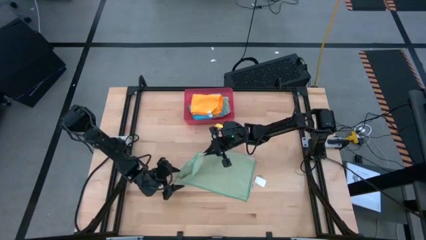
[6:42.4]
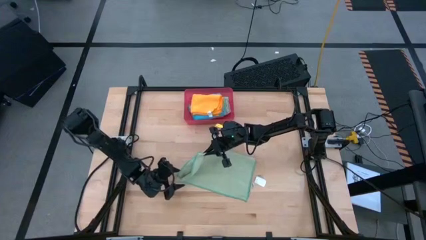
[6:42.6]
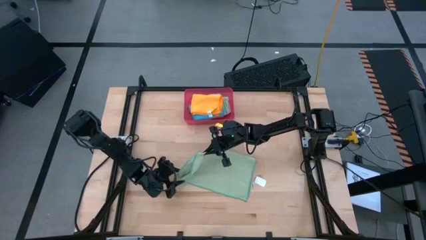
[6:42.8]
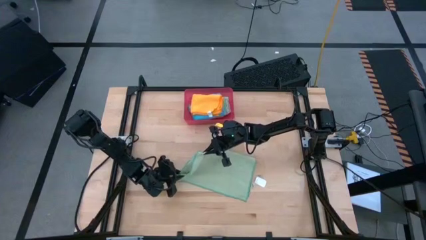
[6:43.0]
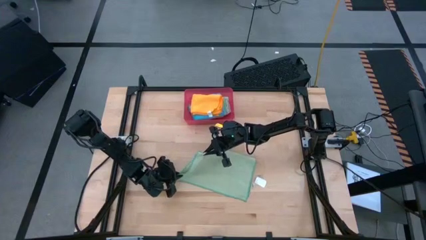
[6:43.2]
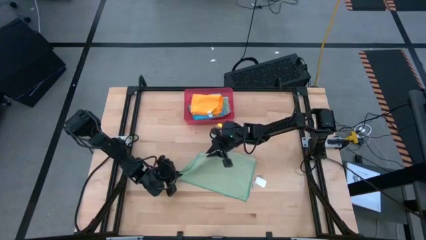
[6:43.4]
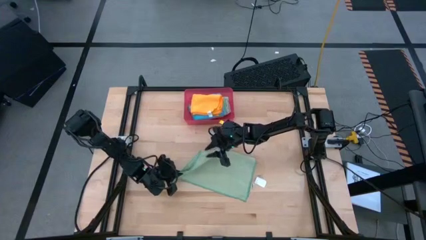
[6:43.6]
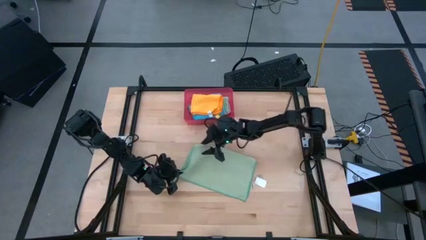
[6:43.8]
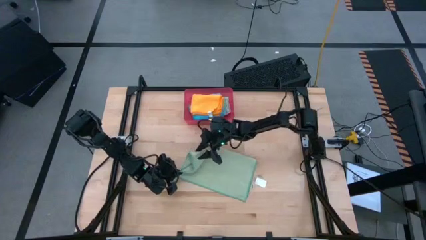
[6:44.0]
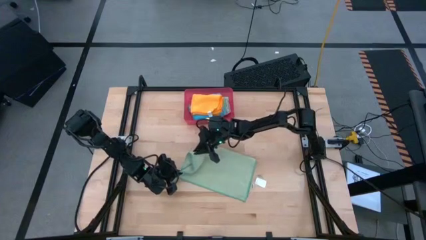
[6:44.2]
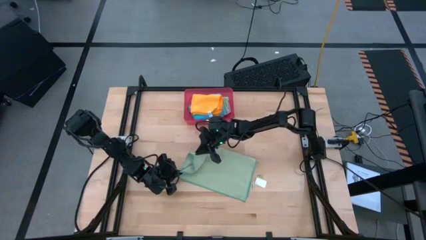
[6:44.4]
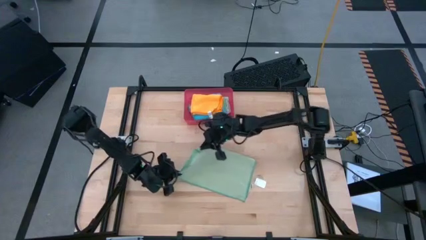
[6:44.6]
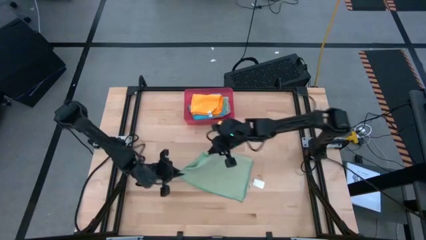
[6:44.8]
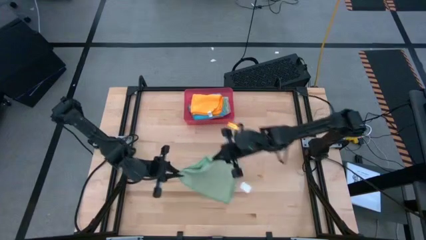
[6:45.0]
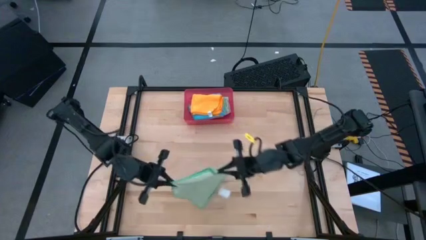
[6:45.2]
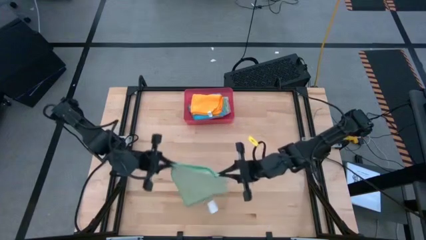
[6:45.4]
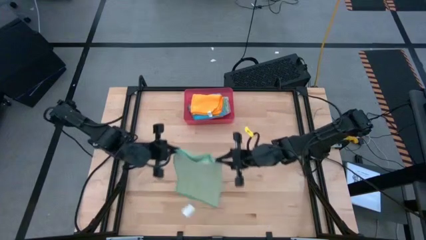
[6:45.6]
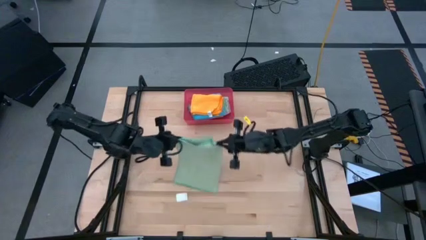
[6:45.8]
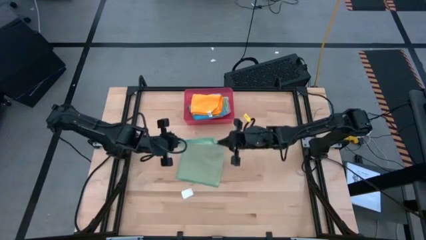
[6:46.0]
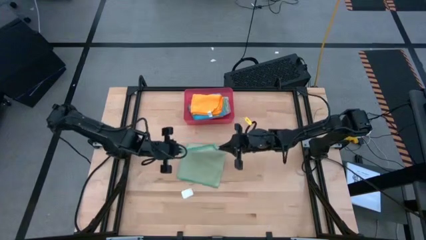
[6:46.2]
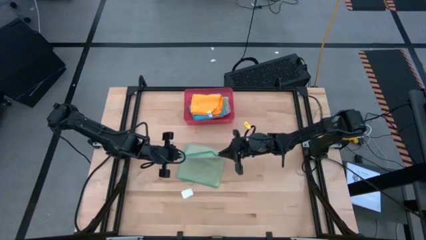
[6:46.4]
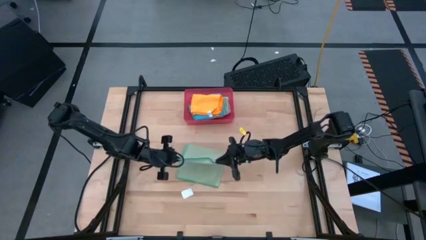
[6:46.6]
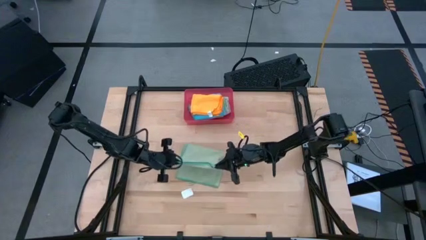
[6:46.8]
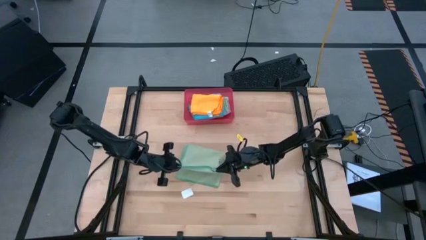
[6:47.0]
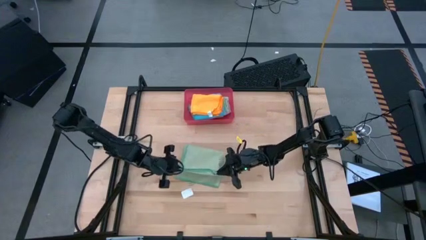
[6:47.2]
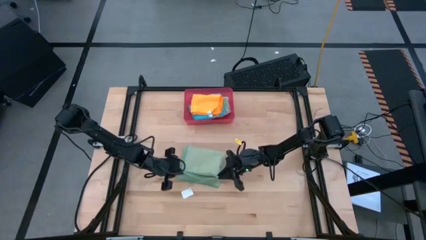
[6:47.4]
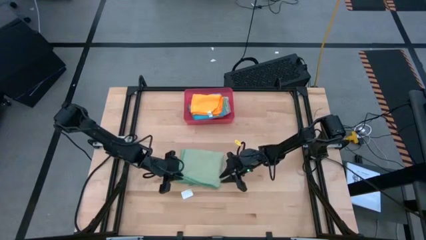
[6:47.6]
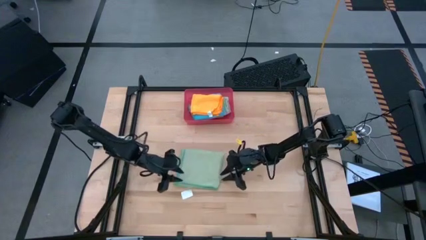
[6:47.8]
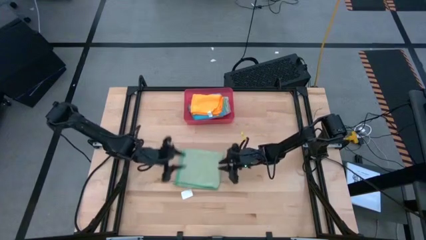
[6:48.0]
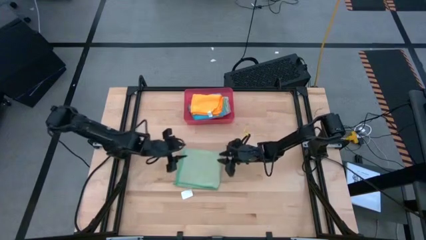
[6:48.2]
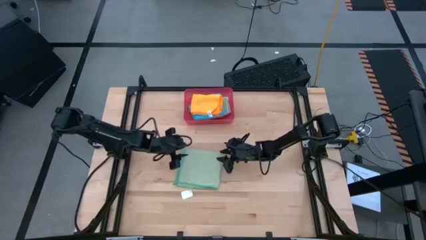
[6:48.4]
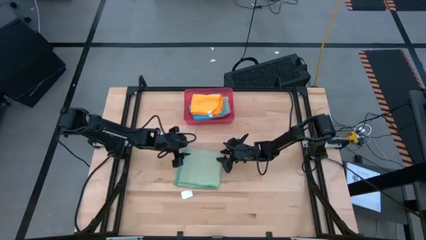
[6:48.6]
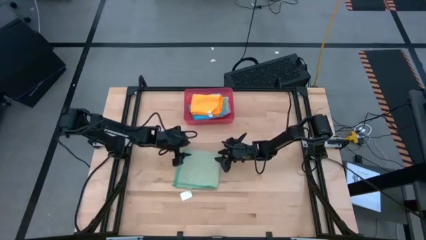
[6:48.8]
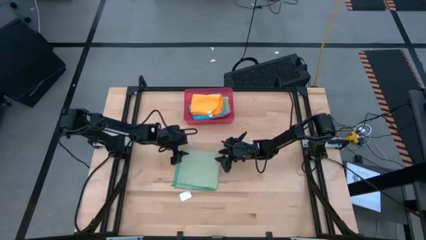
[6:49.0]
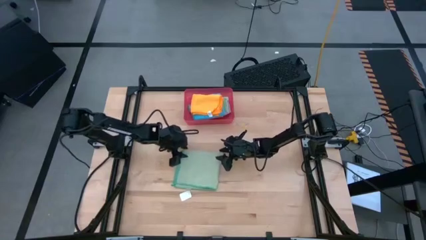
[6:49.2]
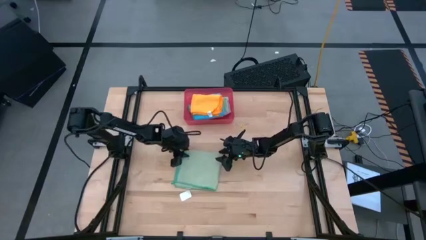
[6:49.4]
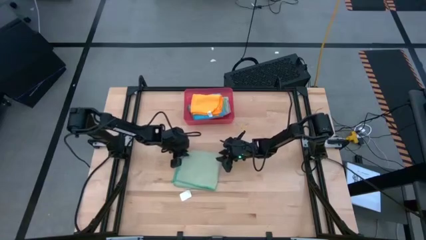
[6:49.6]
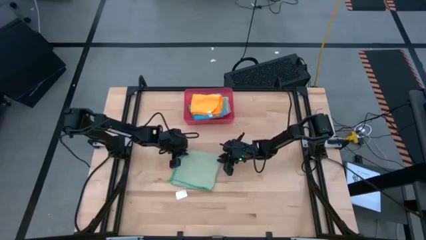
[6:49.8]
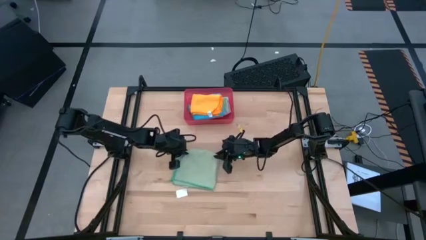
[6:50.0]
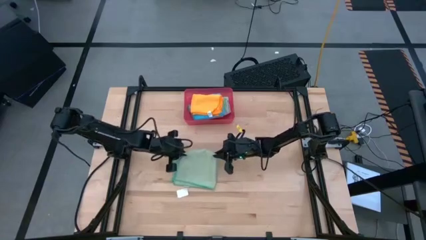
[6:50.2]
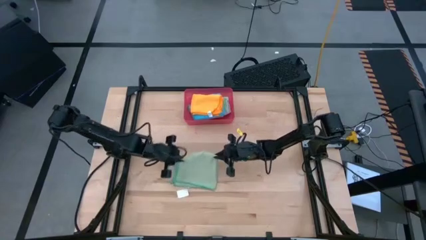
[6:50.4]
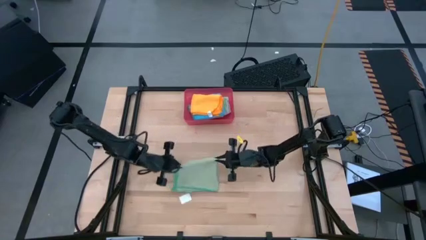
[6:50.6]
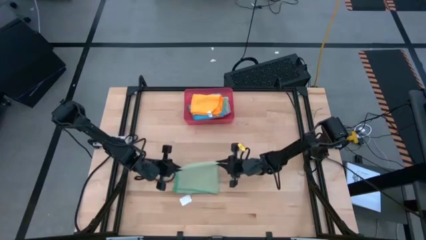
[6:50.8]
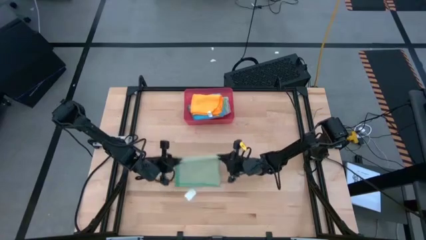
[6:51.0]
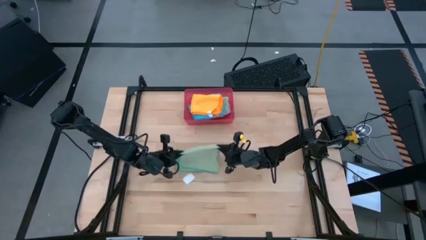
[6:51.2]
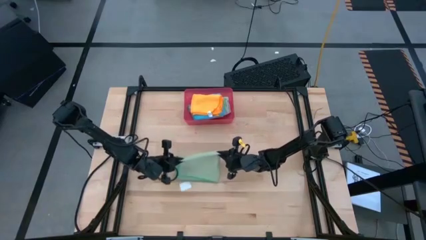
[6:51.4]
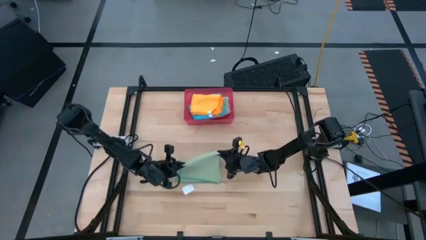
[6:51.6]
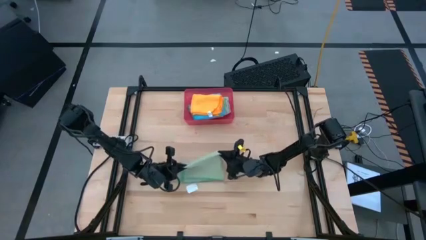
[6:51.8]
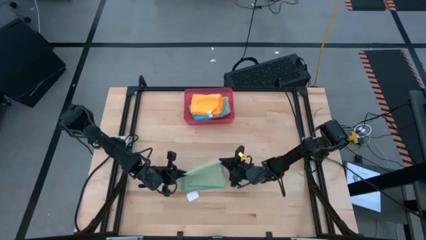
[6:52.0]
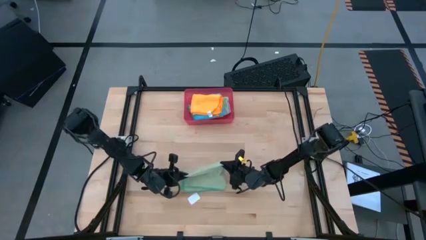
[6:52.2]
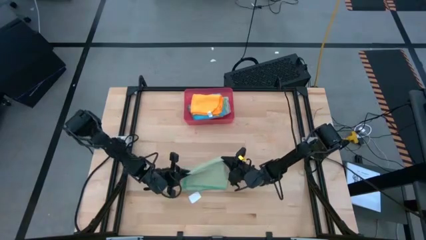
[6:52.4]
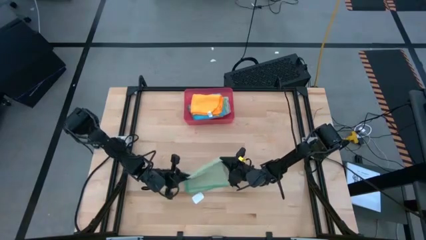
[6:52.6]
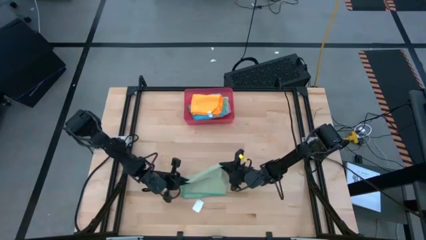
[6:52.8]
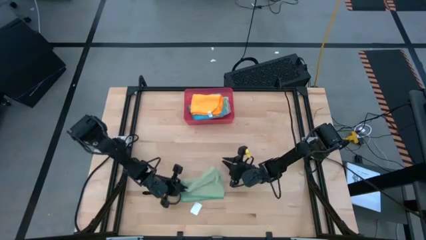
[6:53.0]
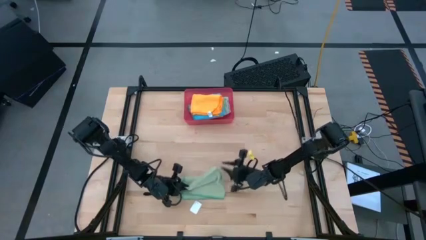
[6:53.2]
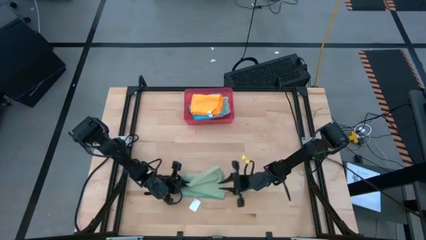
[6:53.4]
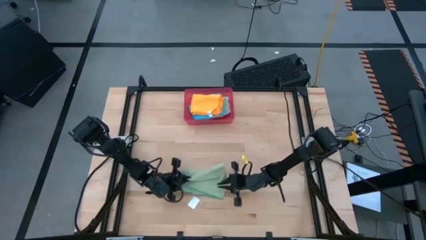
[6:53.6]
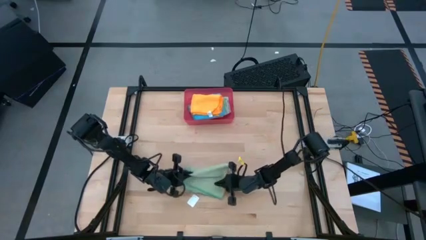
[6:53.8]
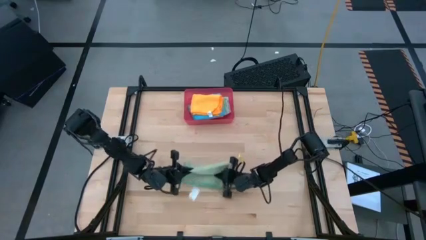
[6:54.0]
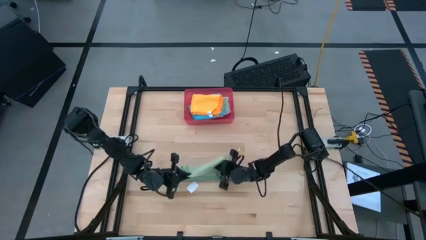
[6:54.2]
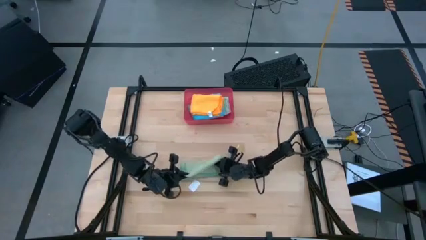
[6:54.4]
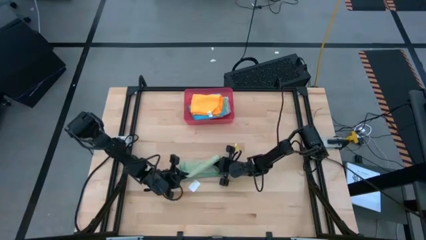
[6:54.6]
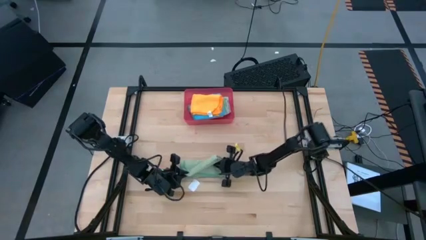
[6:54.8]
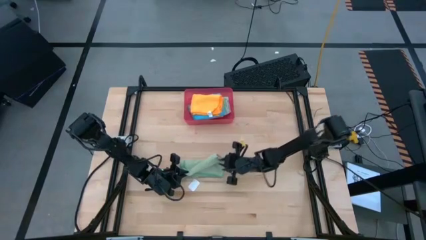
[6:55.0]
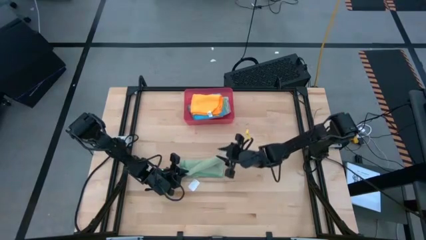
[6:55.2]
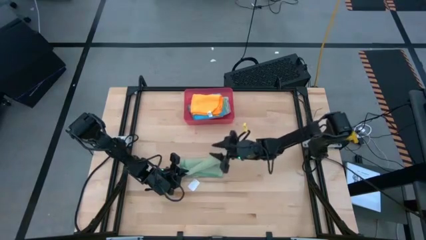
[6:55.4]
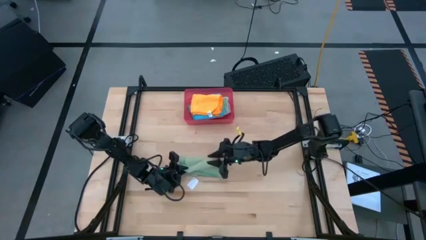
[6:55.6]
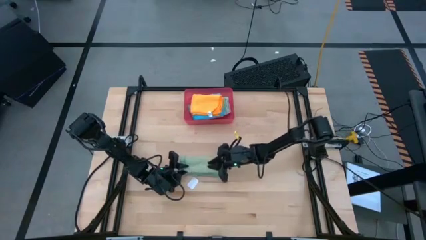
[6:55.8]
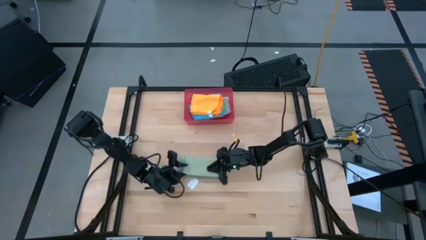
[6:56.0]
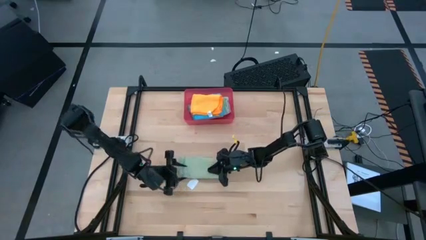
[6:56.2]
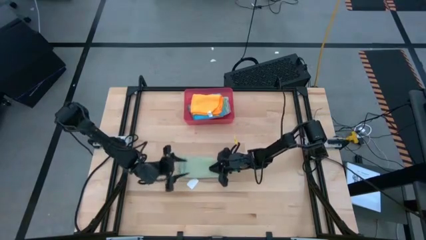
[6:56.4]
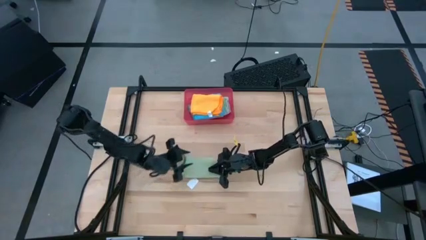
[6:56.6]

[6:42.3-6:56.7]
Task: Fold microfiber towels
Fold the light green towel
